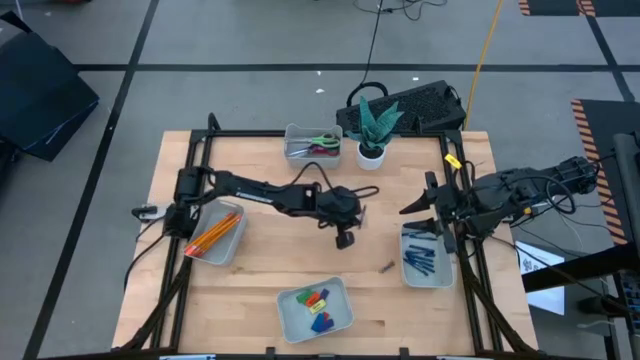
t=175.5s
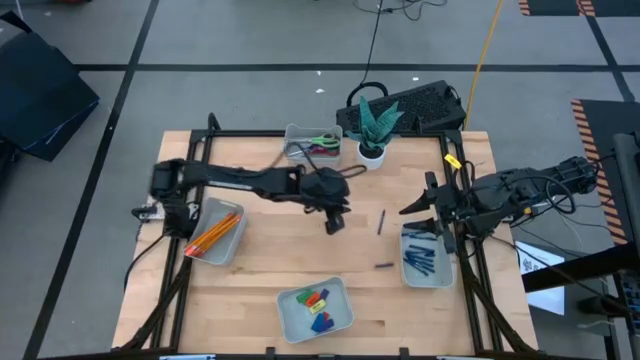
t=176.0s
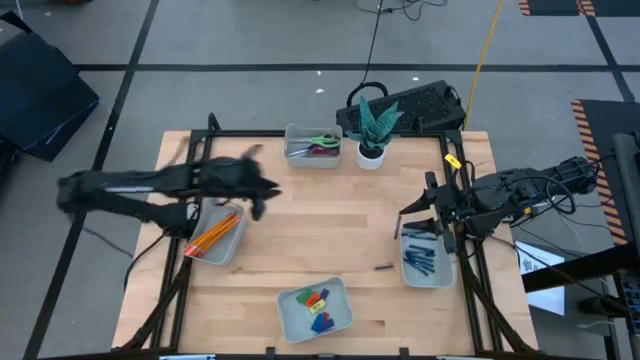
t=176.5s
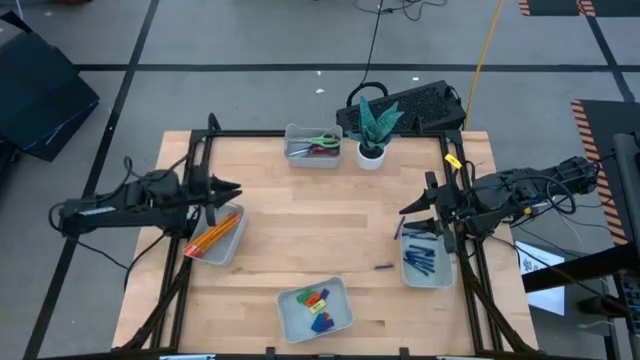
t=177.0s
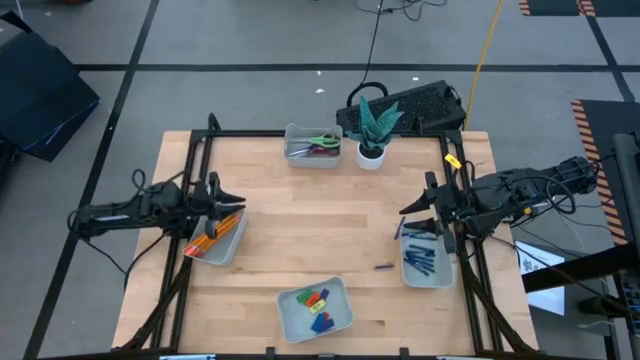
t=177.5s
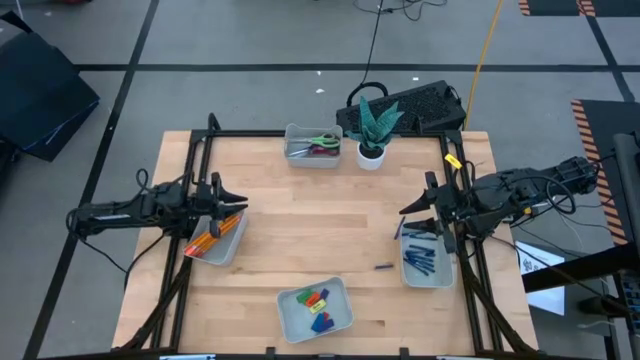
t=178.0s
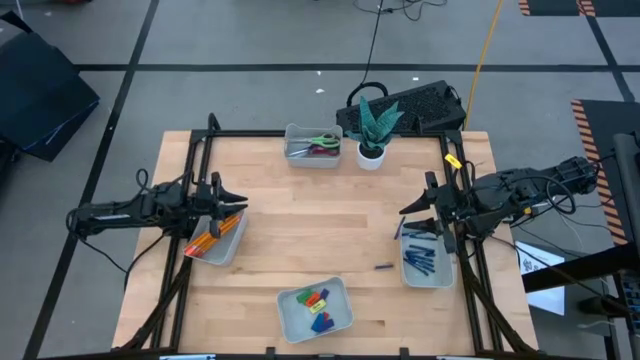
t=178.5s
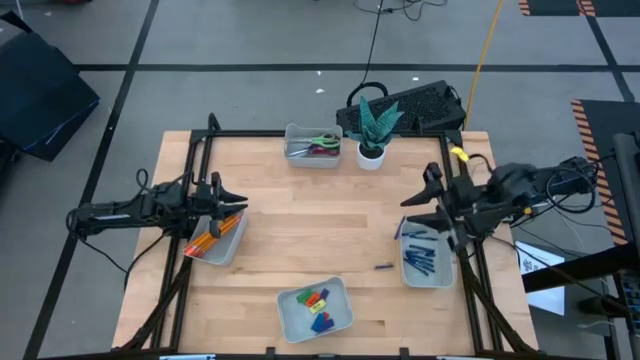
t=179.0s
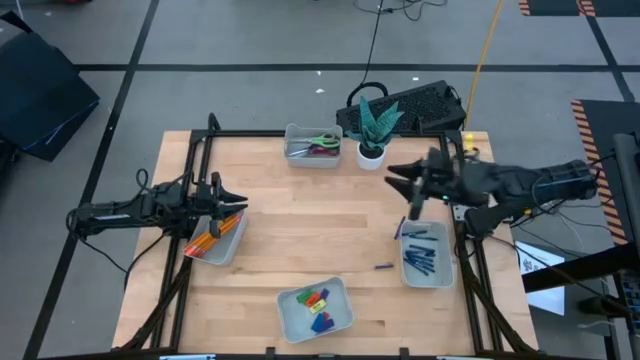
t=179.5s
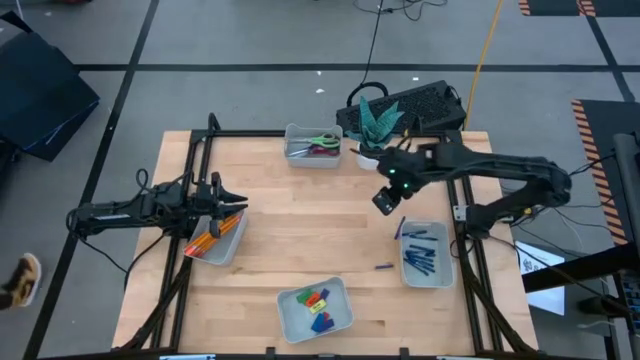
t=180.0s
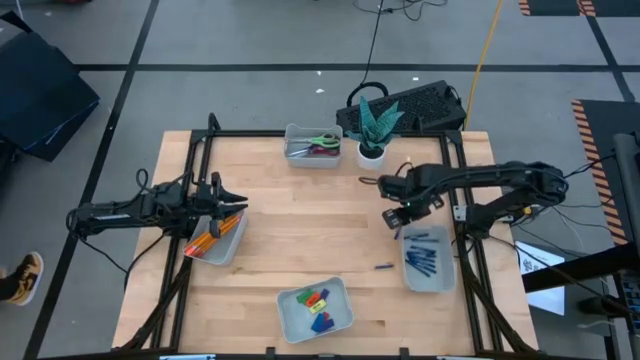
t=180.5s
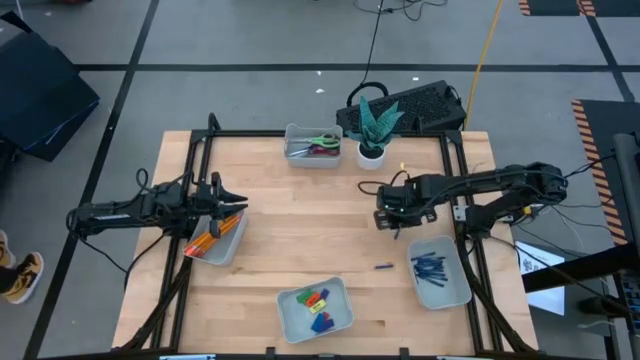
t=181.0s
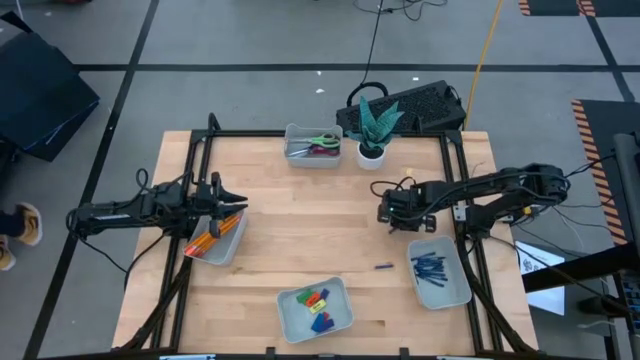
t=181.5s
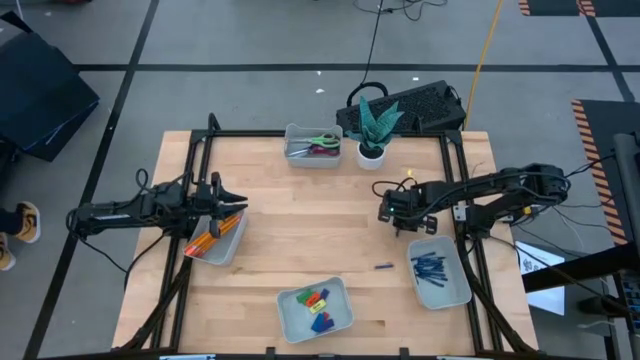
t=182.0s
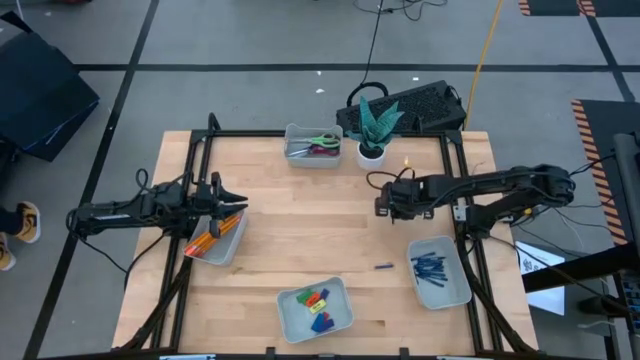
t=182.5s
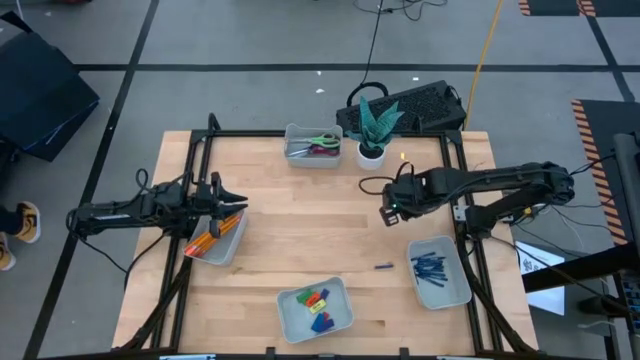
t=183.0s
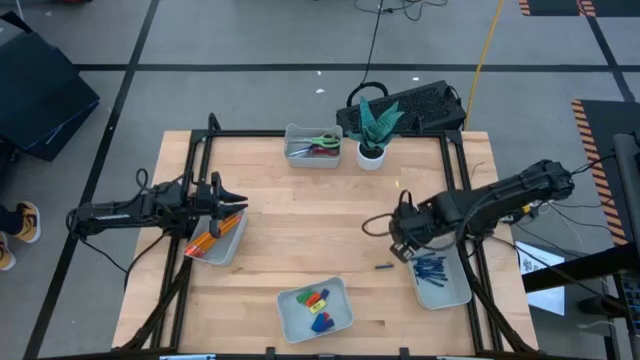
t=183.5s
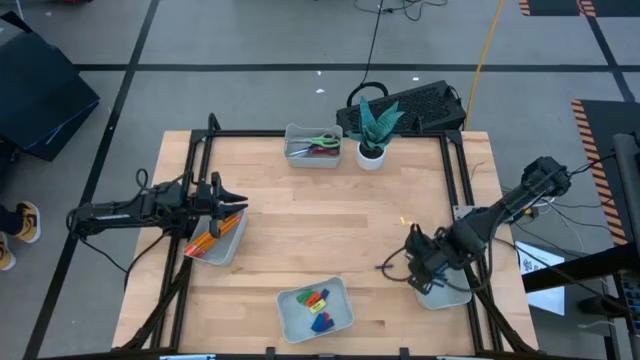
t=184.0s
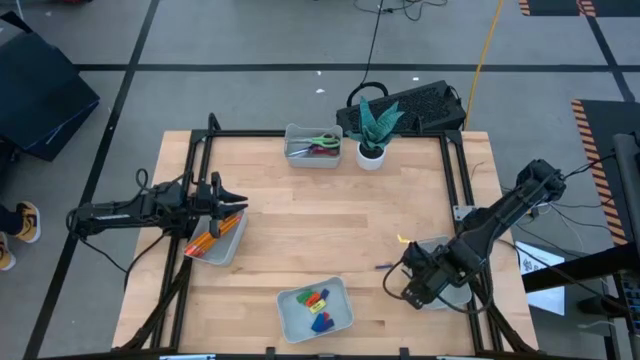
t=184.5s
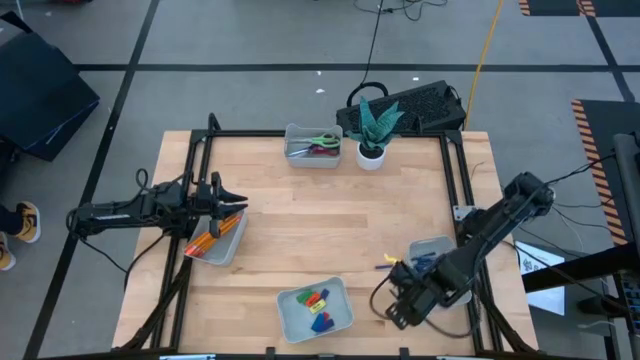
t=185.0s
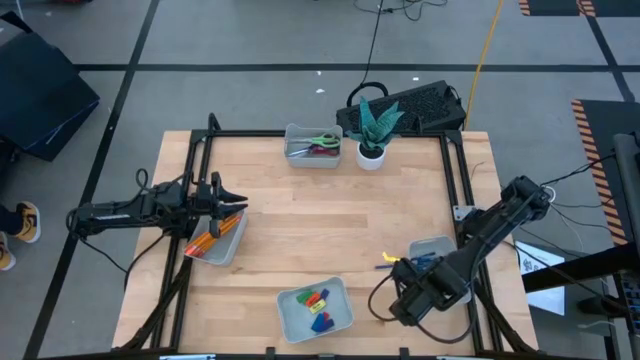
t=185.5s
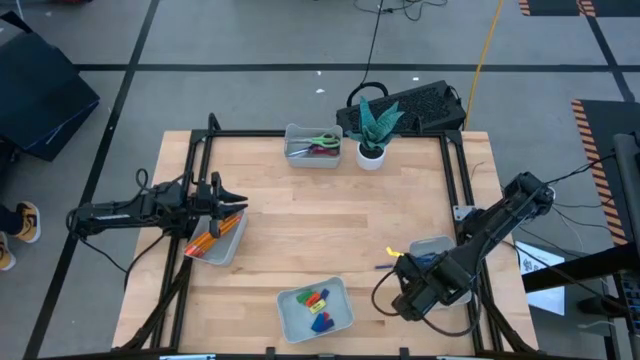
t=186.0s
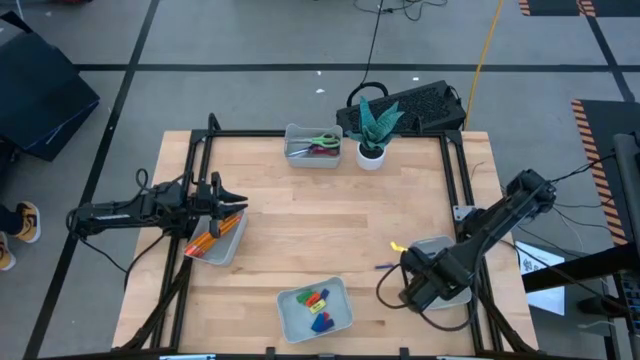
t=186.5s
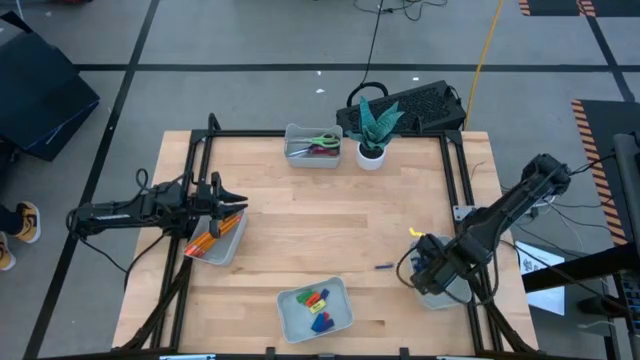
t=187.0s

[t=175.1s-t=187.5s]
Task: Sort crayons/erasers/pens/pencils in bins
Put the blue crayon into the middle right gray bin

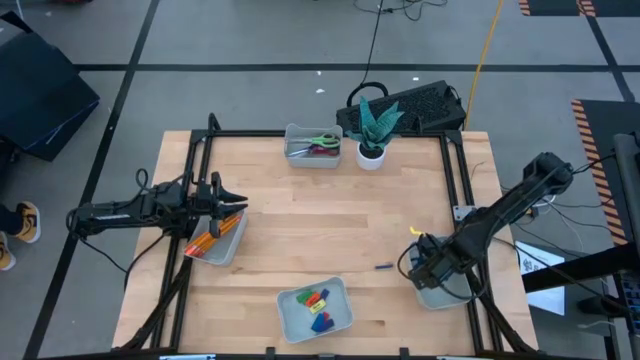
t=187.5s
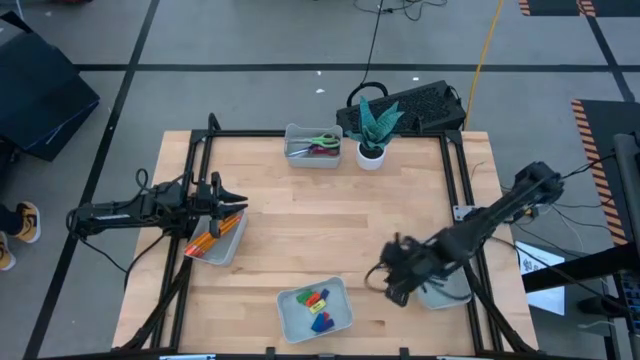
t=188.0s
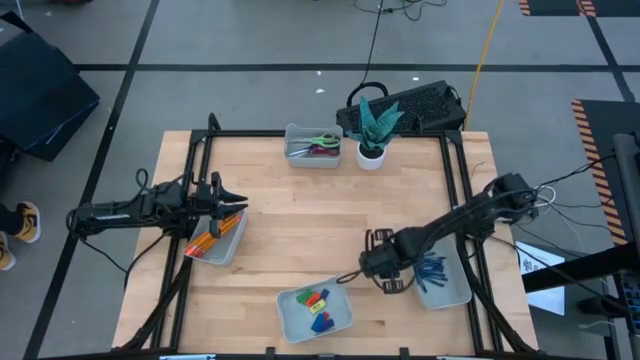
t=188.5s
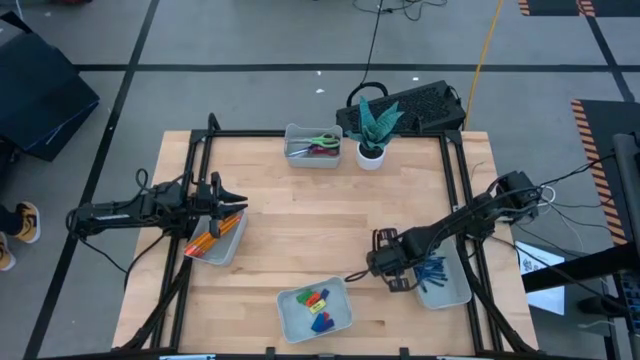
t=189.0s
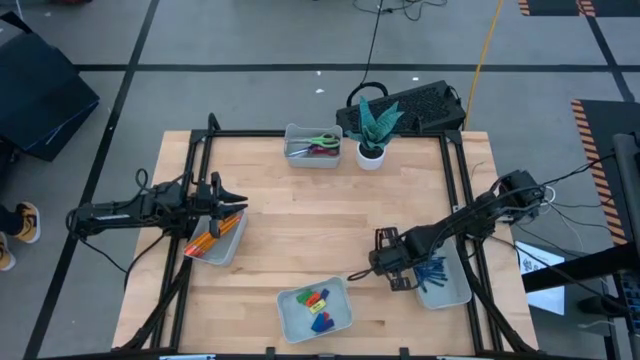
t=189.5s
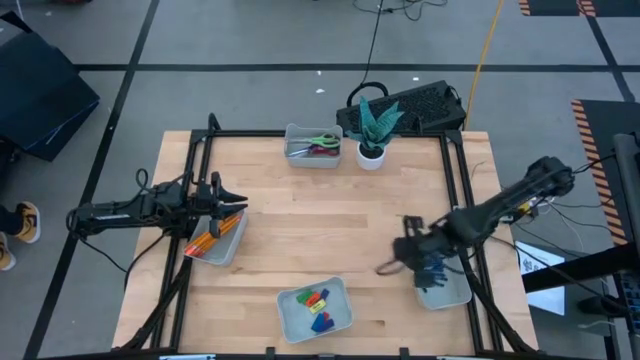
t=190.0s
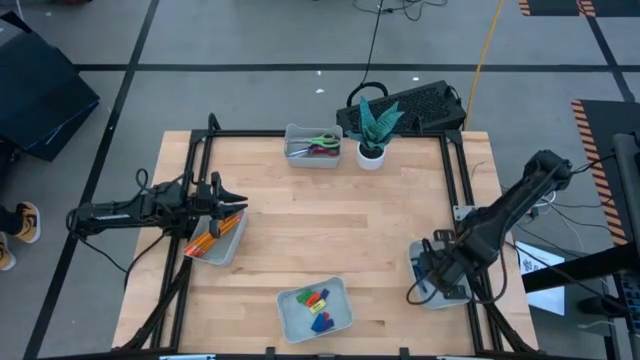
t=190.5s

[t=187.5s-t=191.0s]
Put the blue crayon into the middle right gray bin

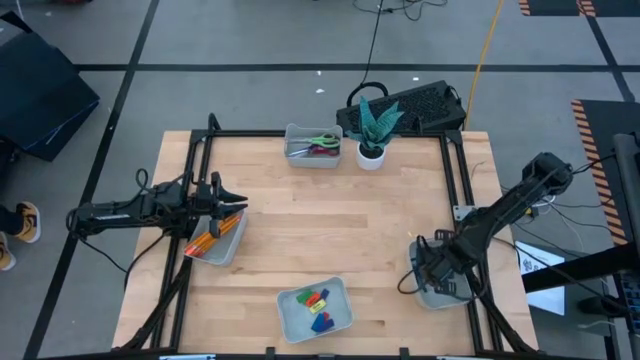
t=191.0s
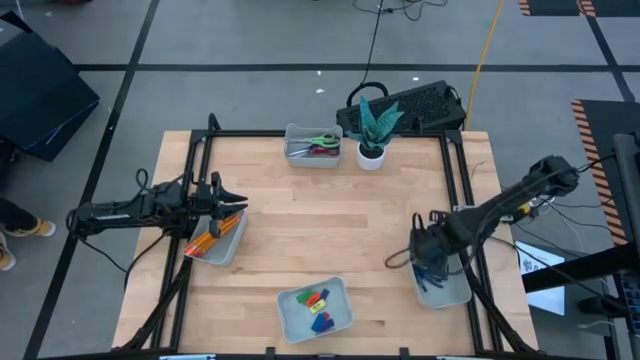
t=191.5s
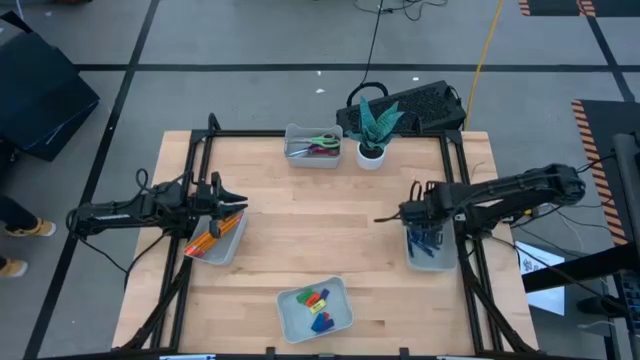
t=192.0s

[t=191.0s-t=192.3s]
Adjust the middle right gray bin

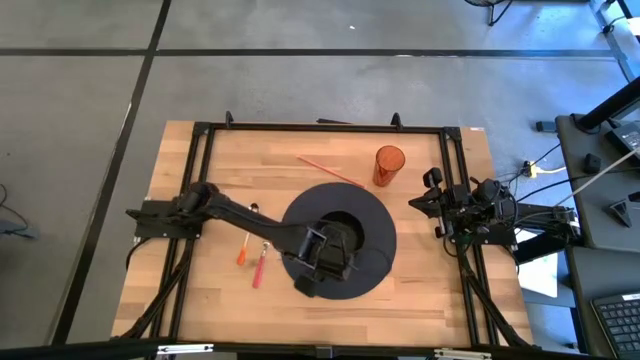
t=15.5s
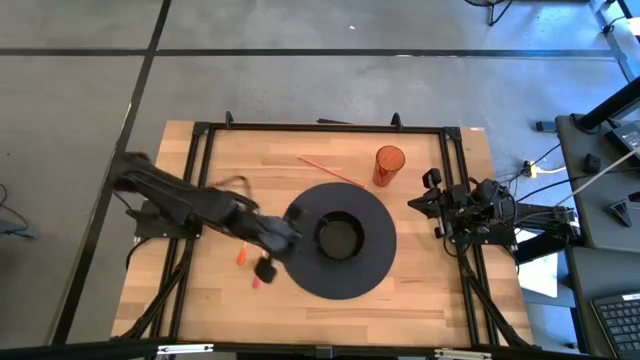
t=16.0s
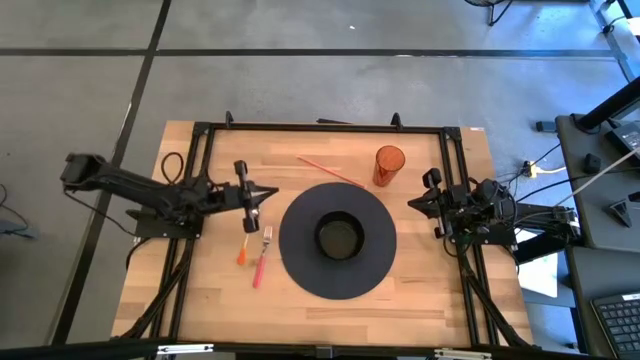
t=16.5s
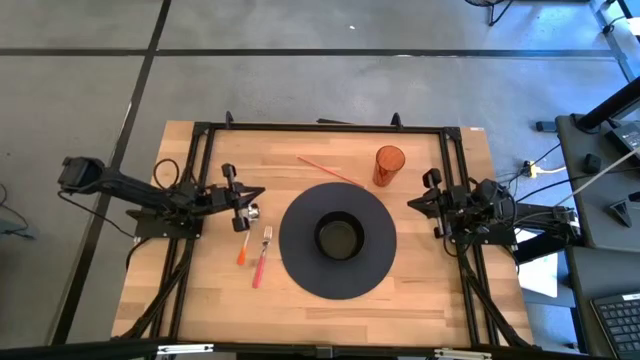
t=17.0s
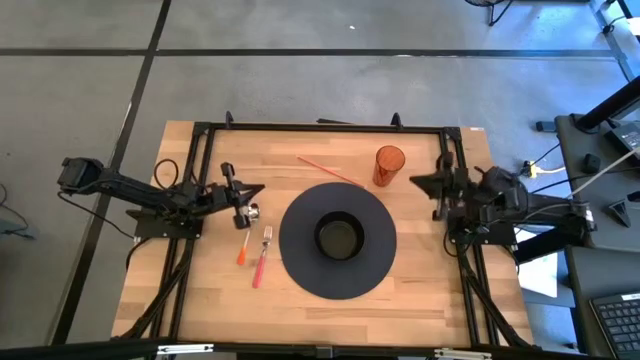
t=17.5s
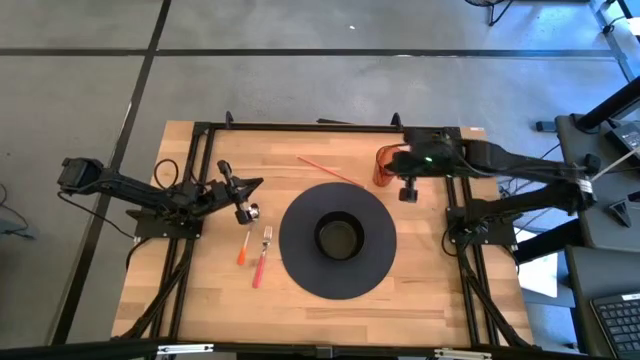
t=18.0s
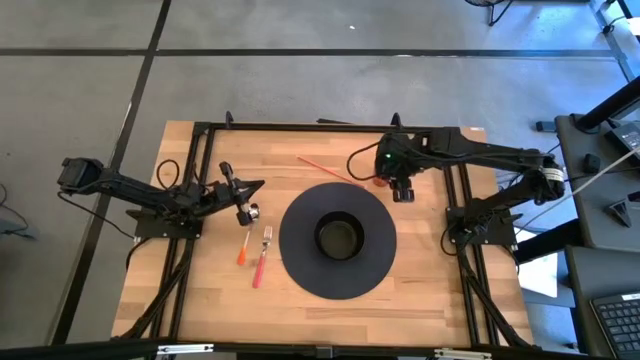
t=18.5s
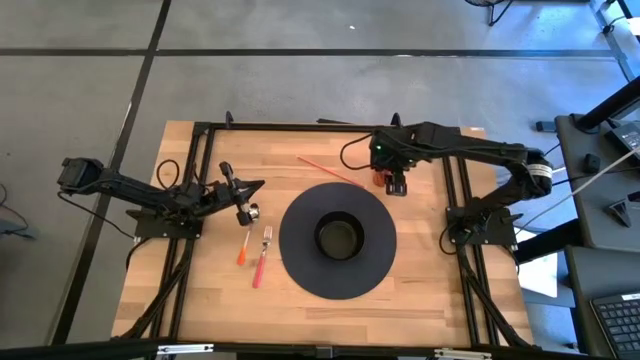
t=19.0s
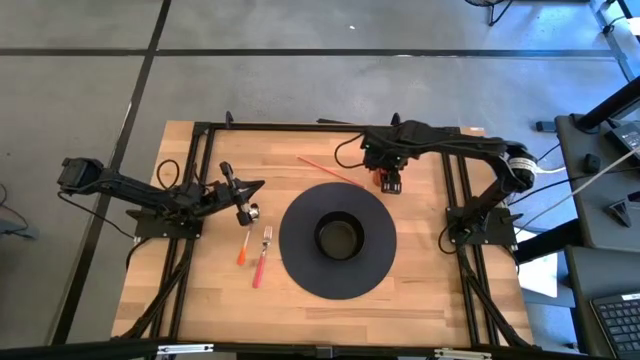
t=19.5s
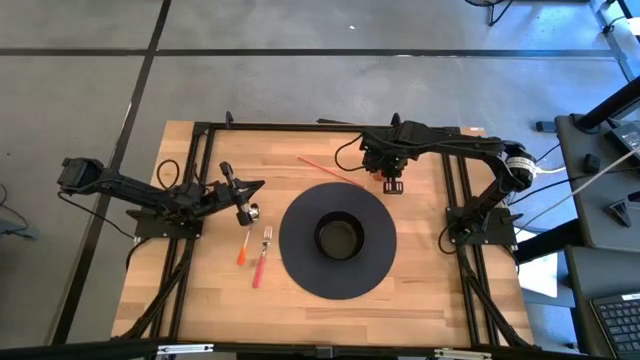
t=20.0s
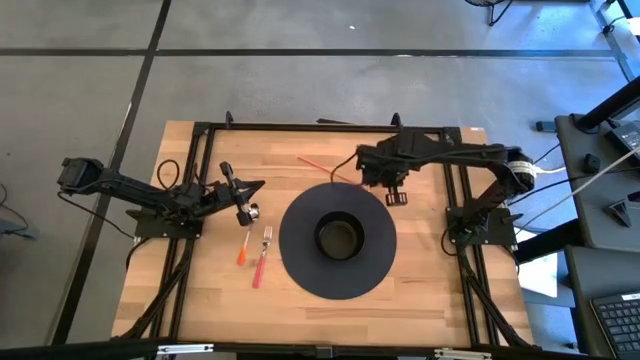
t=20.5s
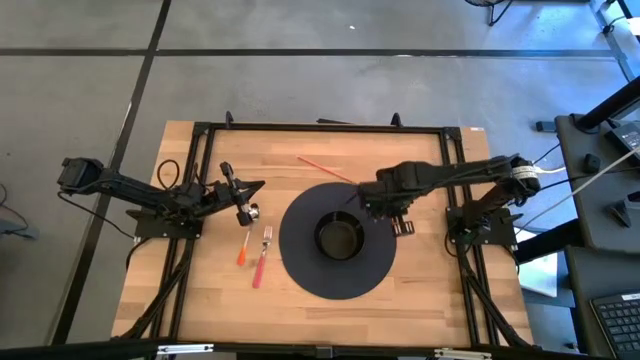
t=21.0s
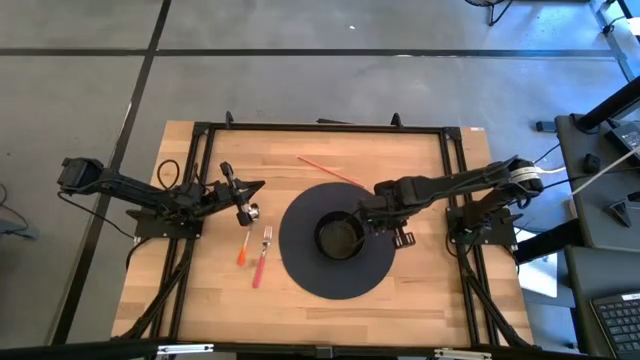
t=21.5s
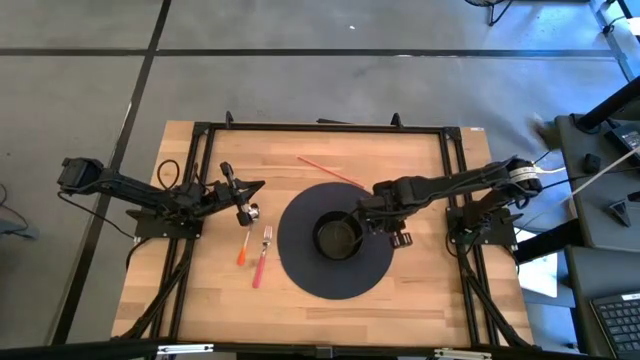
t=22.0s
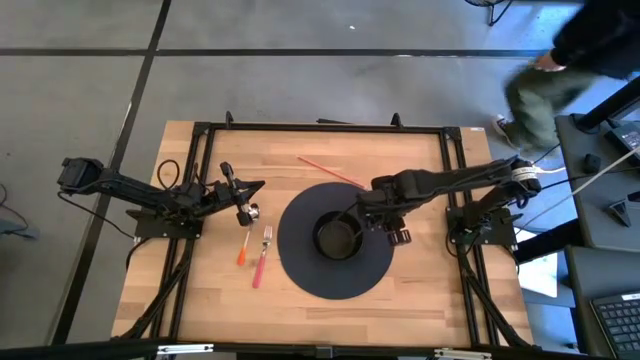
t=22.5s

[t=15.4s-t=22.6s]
Task: Pick & Place Utensil
Put the brown cup to the top right of the black bowl on the black mat
